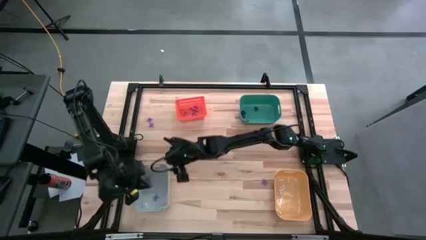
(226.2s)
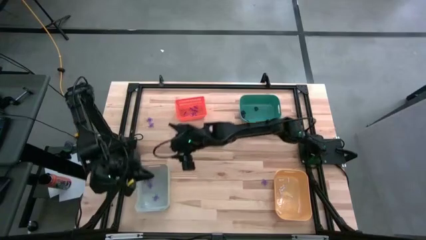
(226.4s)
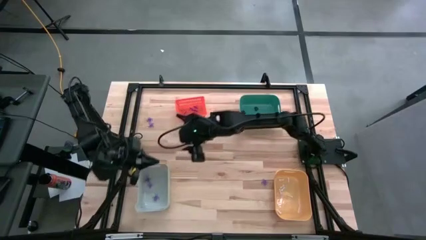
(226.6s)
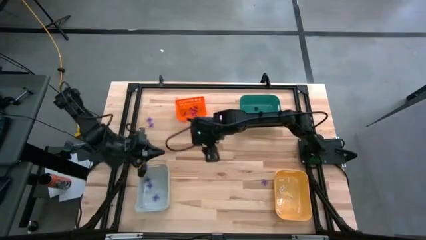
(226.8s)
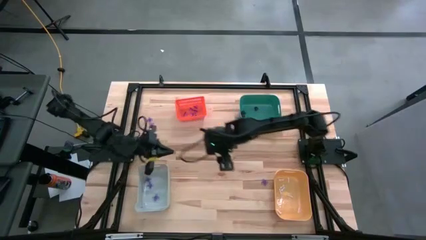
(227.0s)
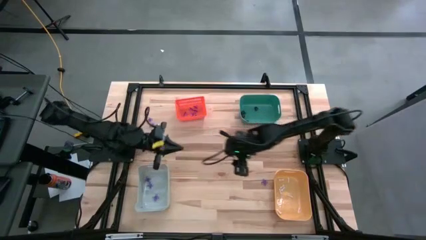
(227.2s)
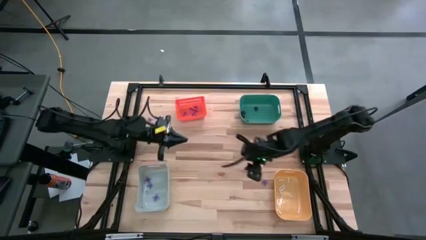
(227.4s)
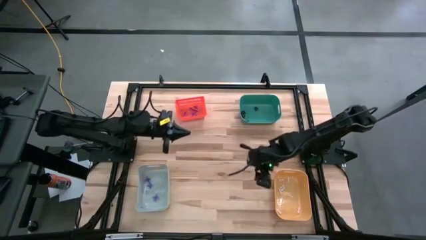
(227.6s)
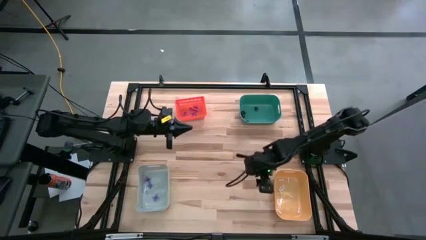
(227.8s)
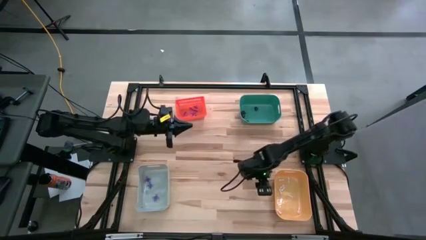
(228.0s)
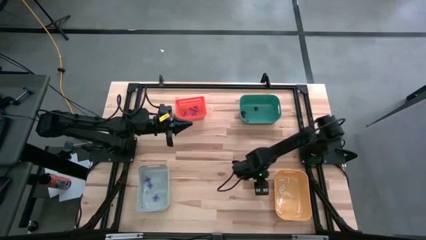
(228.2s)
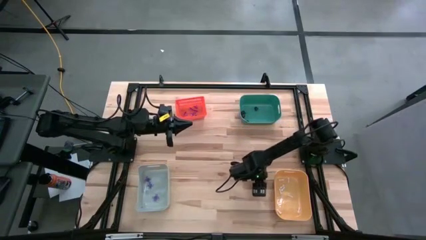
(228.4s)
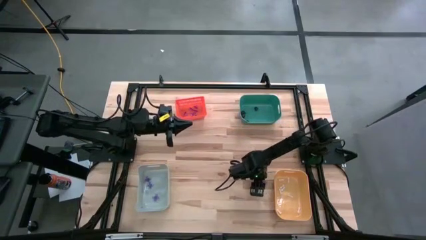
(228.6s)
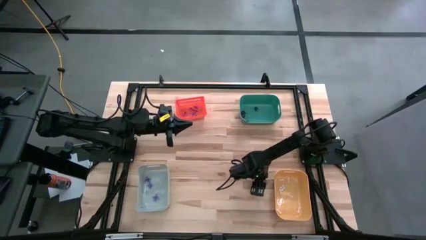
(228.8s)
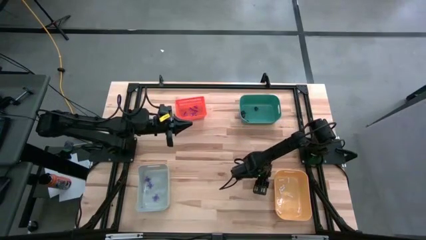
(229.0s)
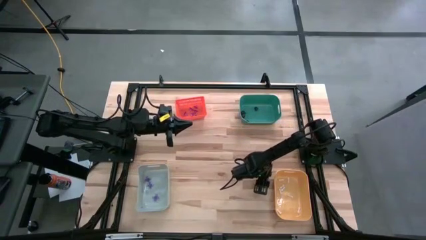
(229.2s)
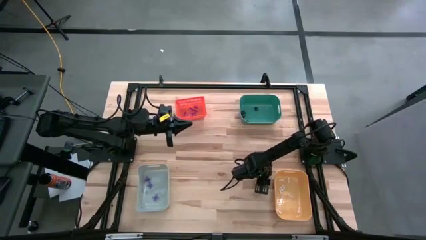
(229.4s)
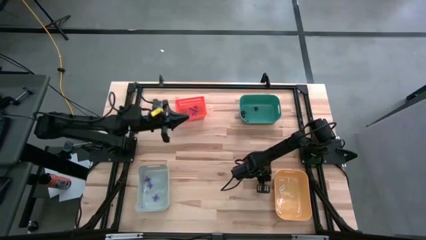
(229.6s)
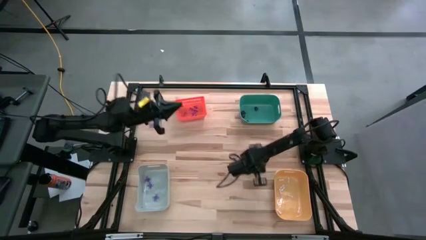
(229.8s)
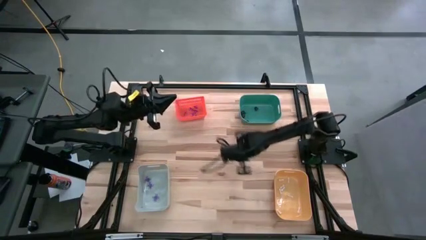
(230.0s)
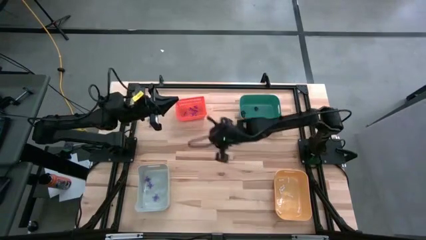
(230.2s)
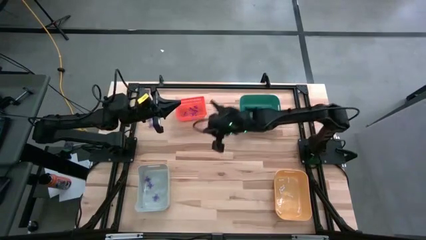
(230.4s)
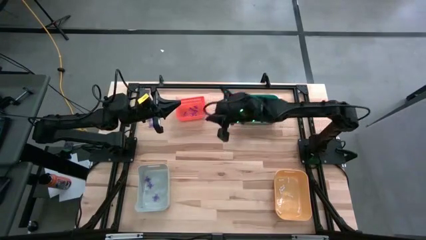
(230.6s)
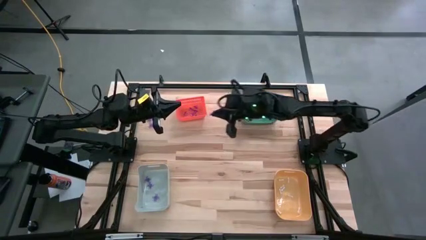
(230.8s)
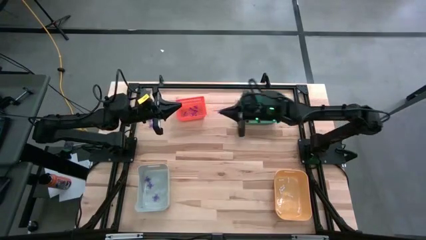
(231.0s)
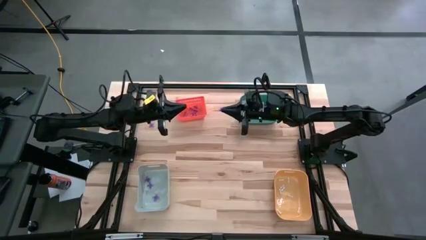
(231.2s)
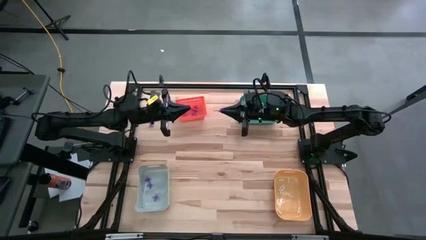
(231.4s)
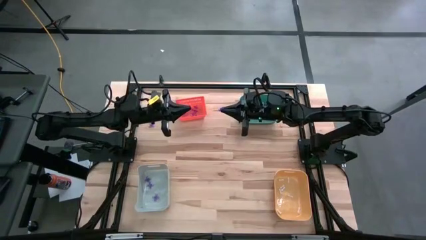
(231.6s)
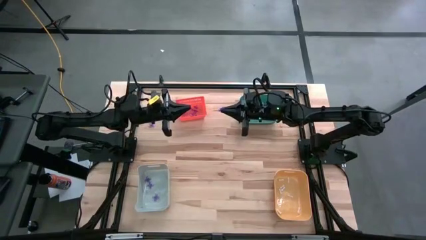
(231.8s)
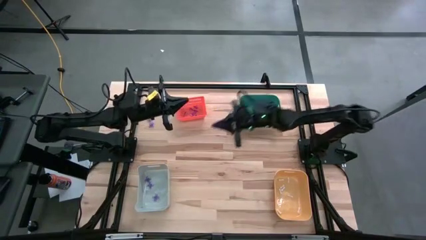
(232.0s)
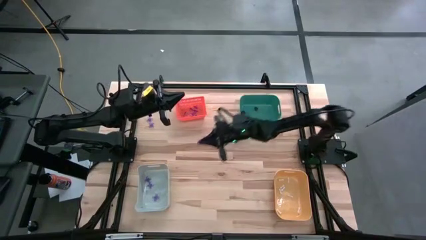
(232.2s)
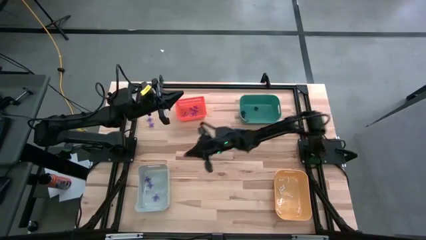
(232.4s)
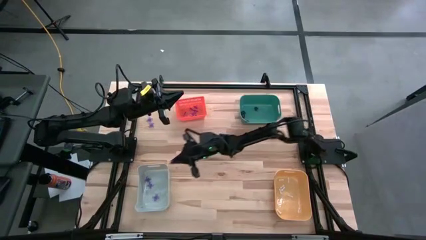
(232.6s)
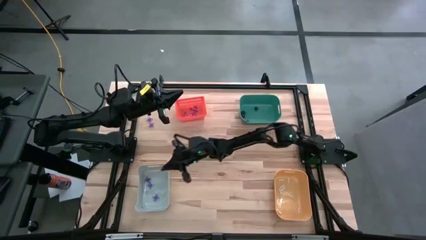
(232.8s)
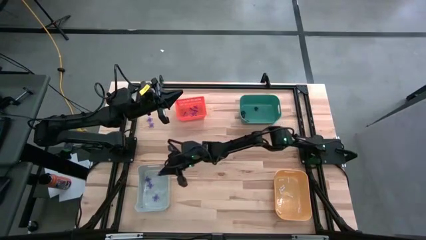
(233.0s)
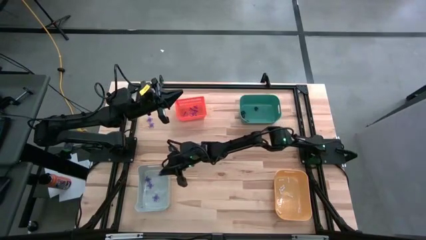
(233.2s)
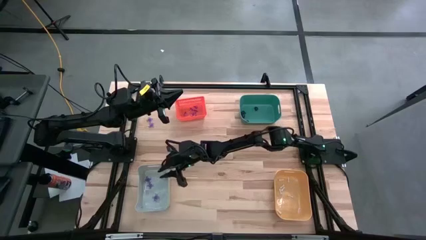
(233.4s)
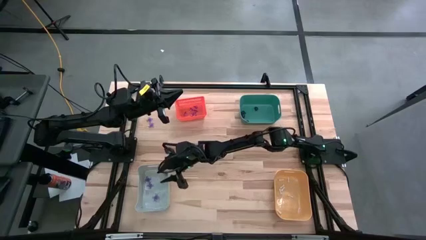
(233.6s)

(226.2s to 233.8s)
Task: Sort Halloween decoration
Put the purple spider toy into the white bin

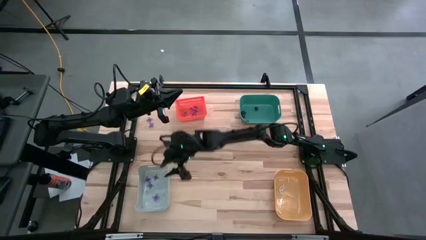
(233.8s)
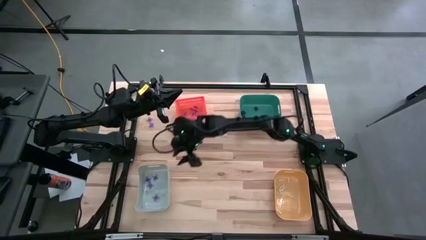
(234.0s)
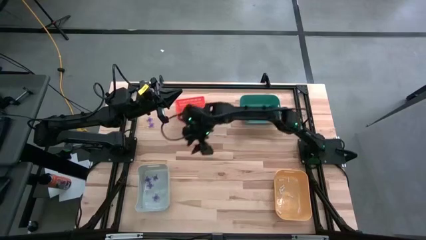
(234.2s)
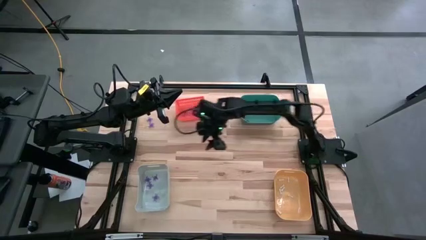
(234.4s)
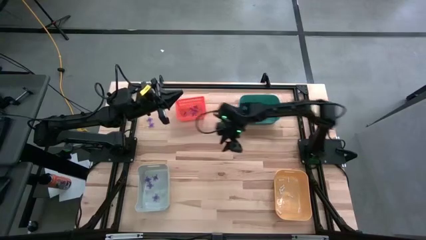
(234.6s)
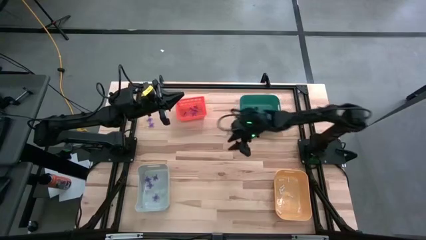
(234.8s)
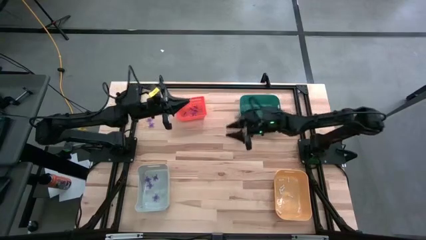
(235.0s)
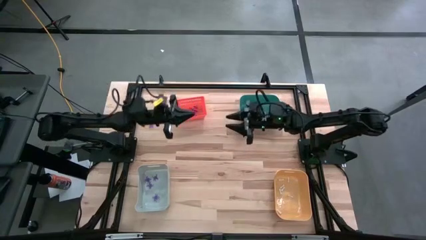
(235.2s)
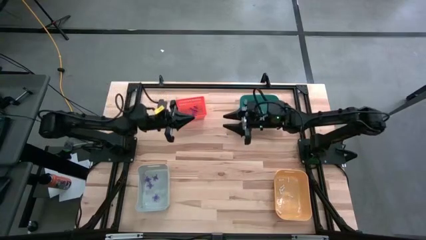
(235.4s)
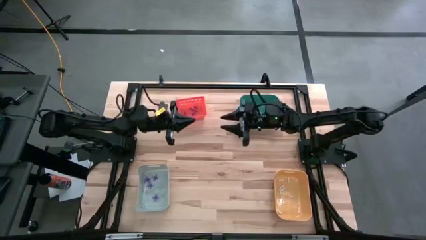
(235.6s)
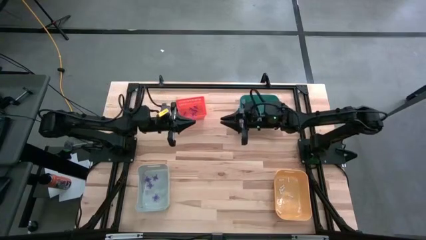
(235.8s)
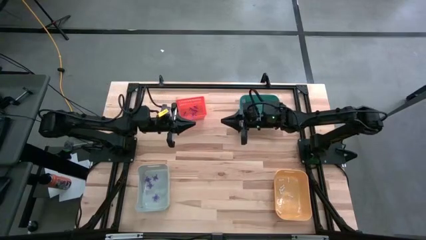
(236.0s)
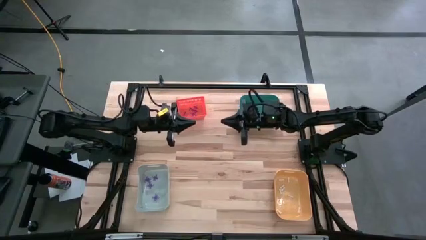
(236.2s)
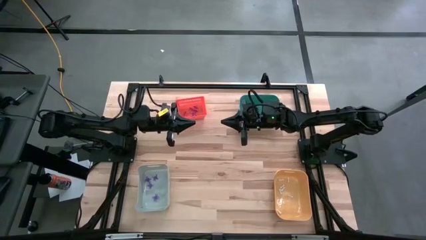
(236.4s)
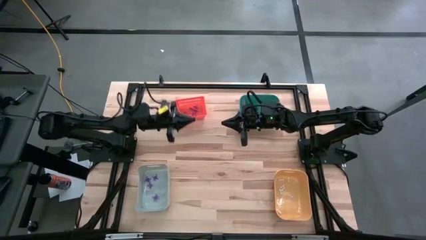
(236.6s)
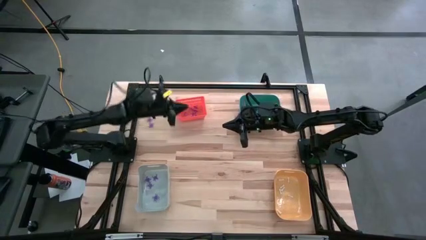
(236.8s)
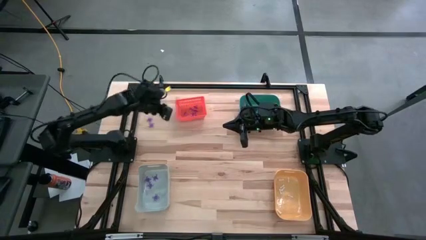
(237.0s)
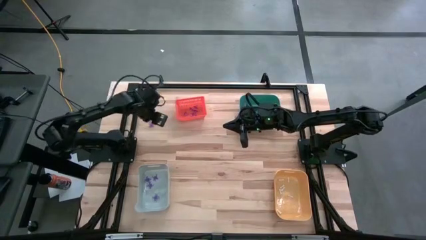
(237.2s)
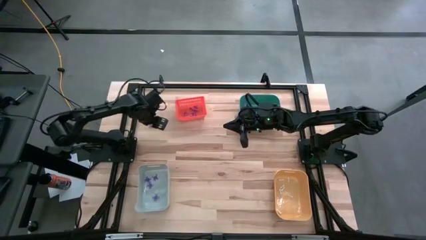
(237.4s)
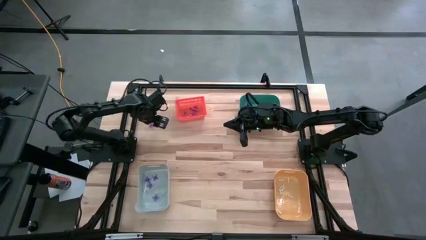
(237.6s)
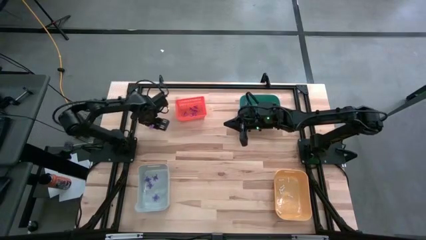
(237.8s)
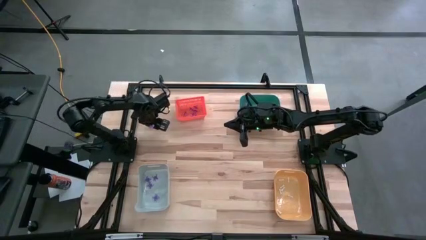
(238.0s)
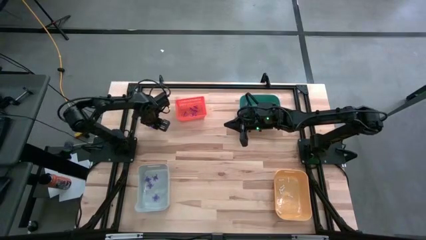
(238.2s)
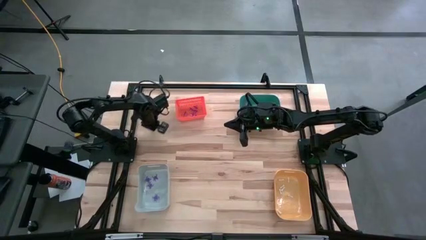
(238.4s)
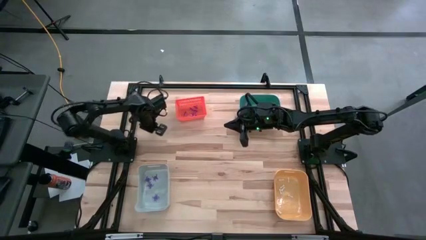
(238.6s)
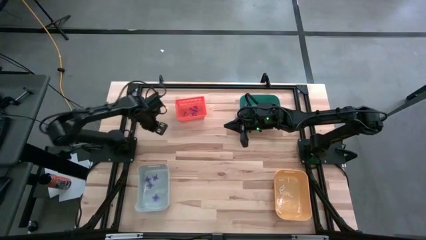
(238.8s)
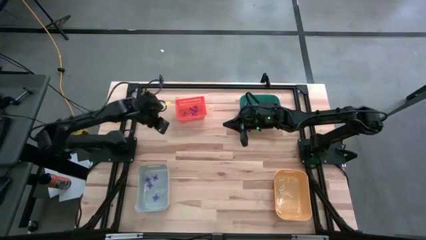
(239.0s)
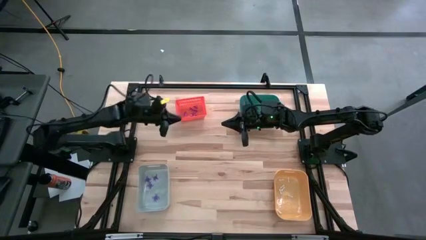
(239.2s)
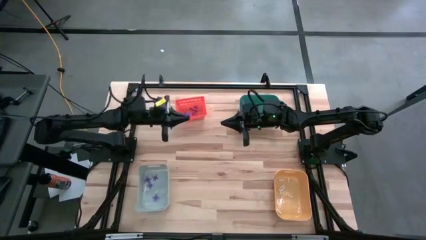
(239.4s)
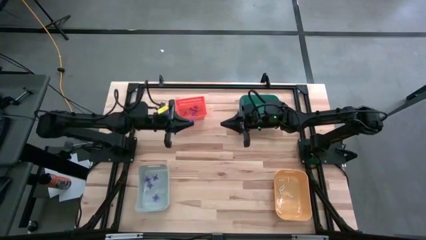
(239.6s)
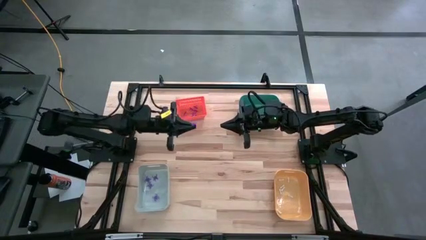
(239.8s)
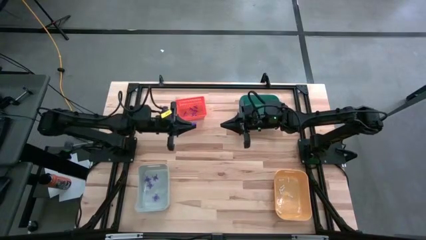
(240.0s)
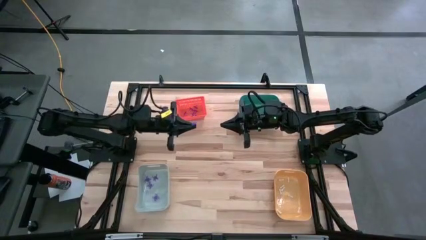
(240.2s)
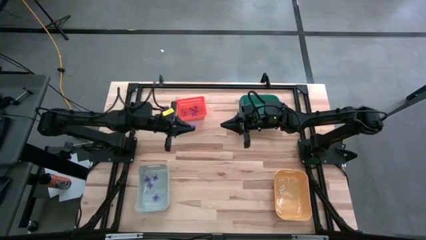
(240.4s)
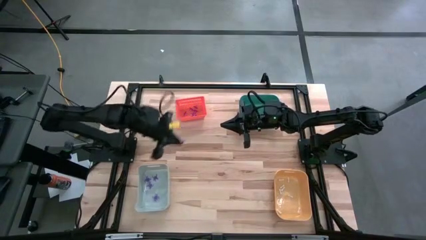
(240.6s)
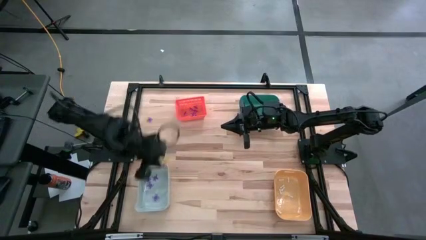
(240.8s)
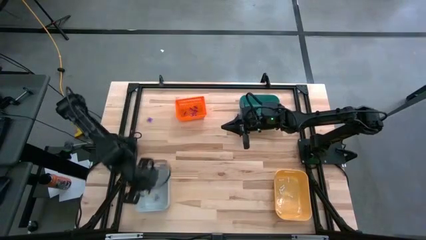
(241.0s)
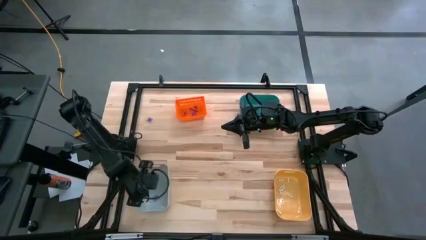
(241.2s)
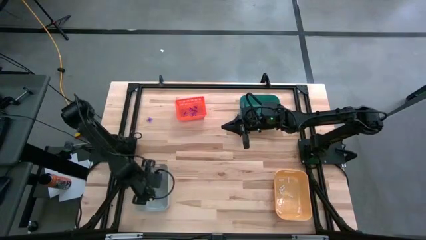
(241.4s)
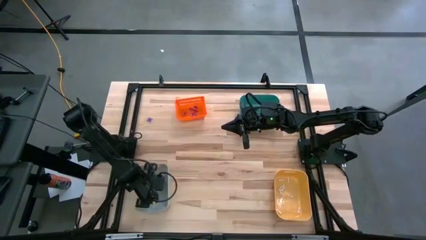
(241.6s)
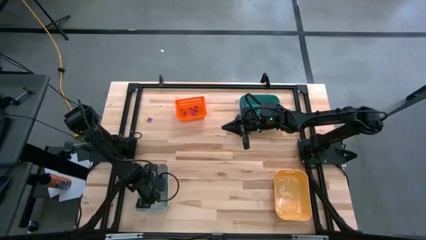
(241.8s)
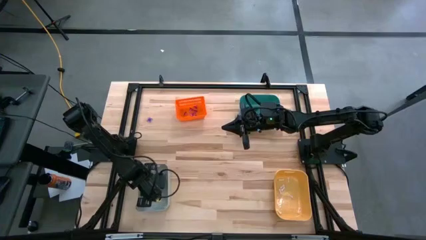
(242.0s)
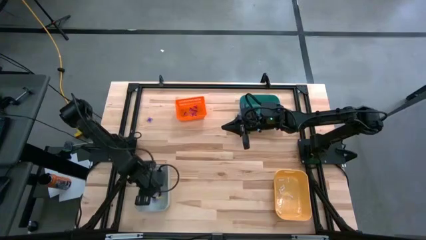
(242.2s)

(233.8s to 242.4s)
Put the purple spider toy into the white bin
